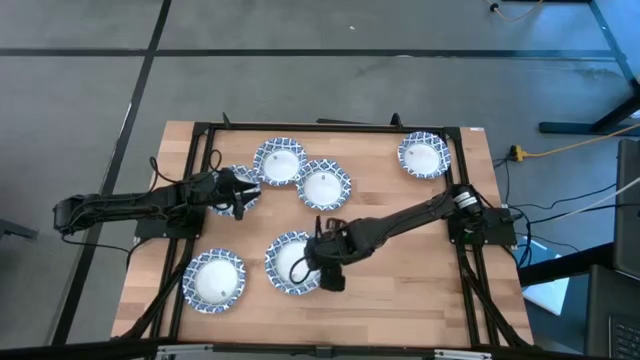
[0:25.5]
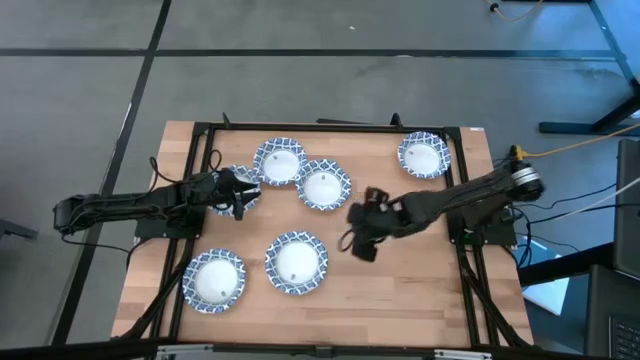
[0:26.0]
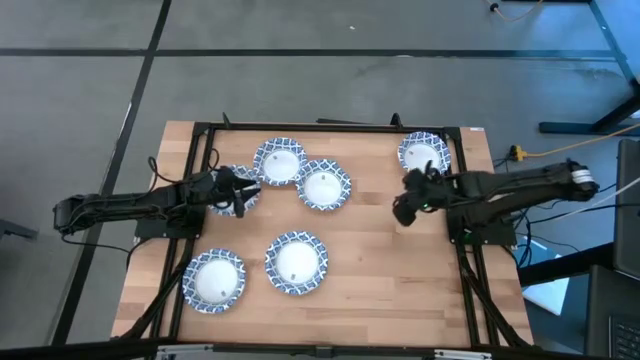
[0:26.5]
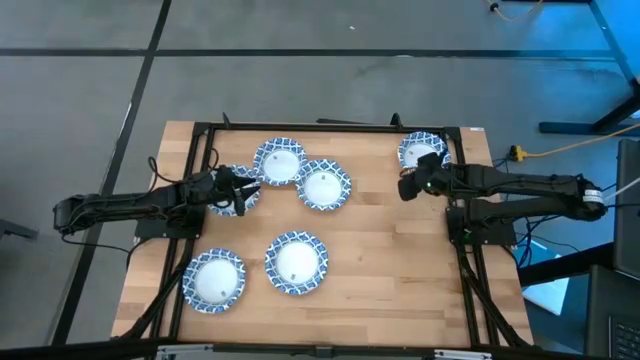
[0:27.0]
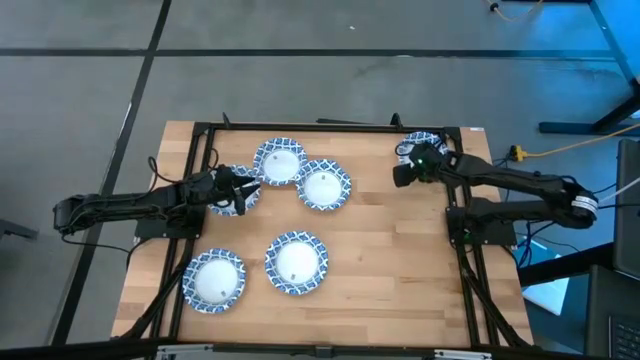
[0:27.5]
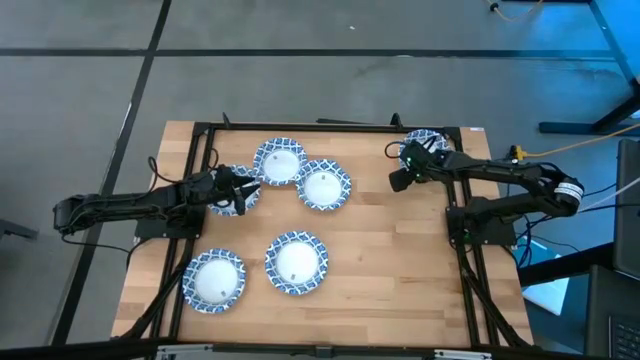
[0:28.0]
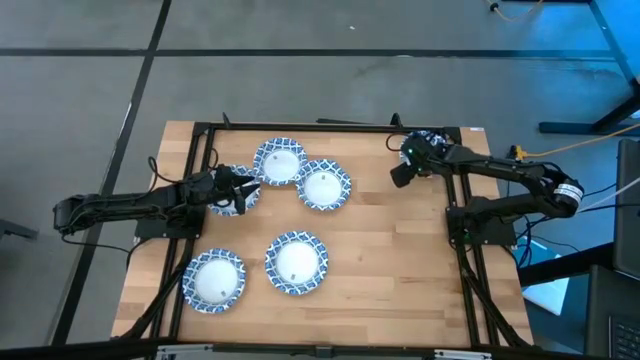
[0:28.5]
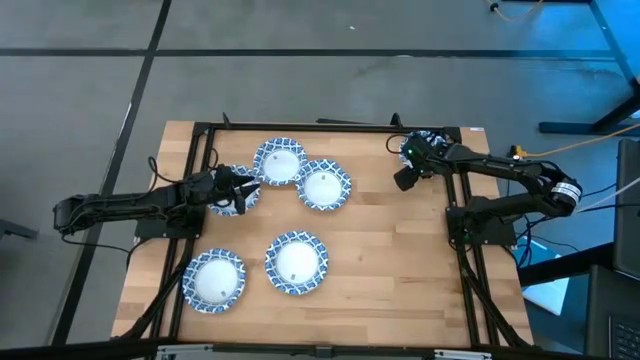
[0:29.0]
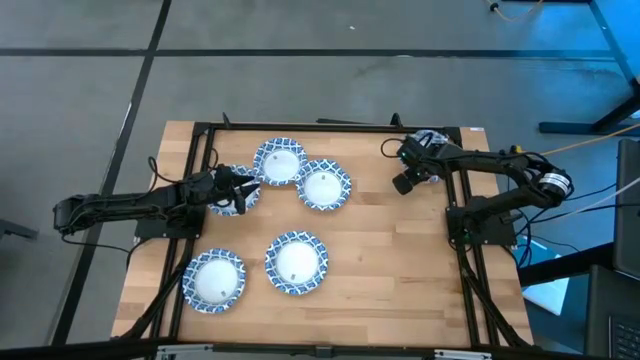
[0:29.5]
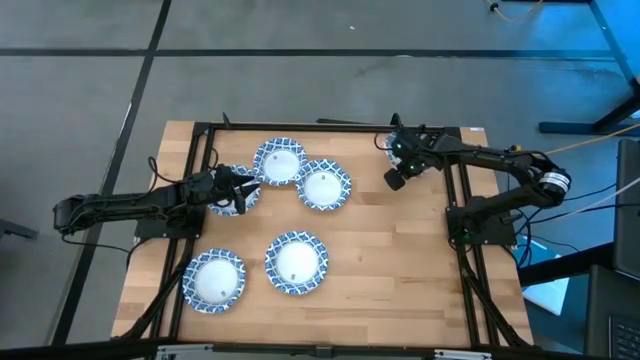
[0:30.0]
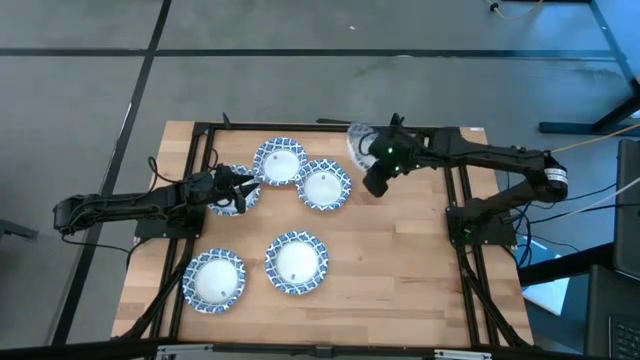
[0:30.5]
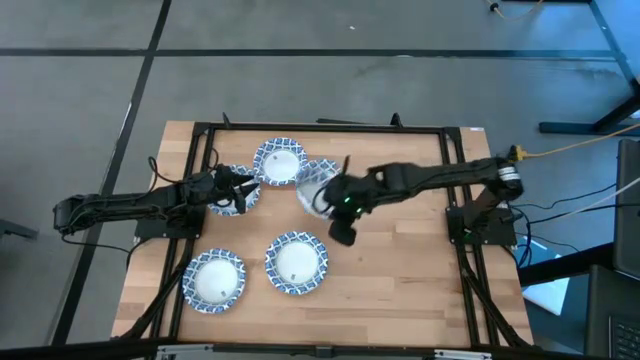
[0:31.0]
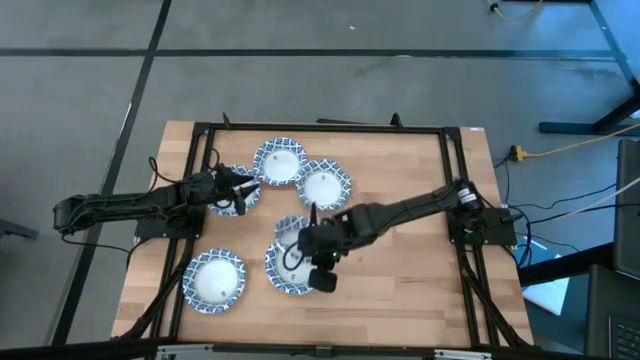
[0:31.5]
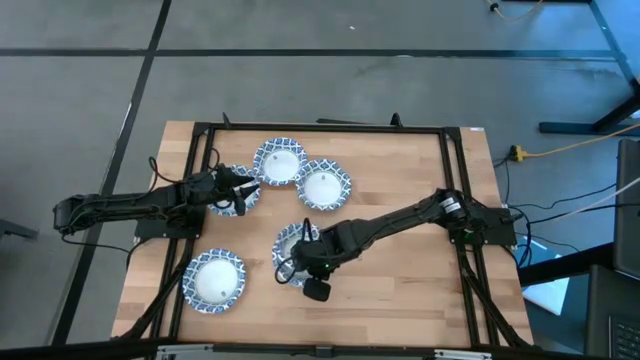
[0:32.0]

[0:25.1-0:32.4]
Task: Nest bowls inside each other
Stack the blue patterned bowl on the stacked blue patterned bowls

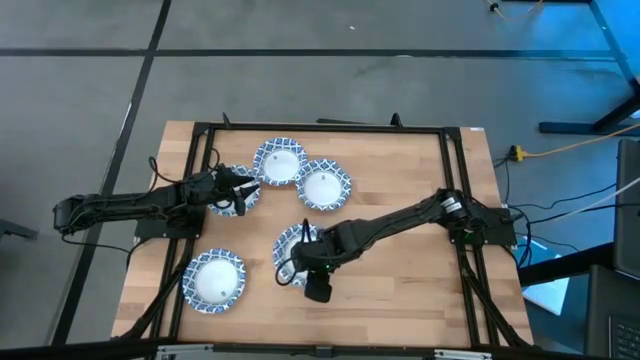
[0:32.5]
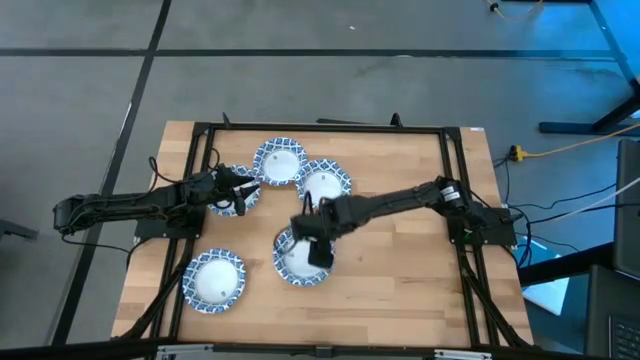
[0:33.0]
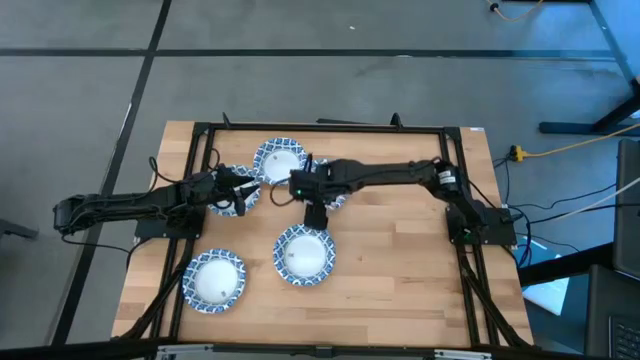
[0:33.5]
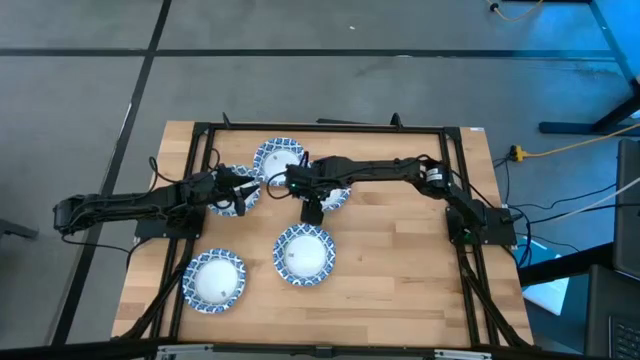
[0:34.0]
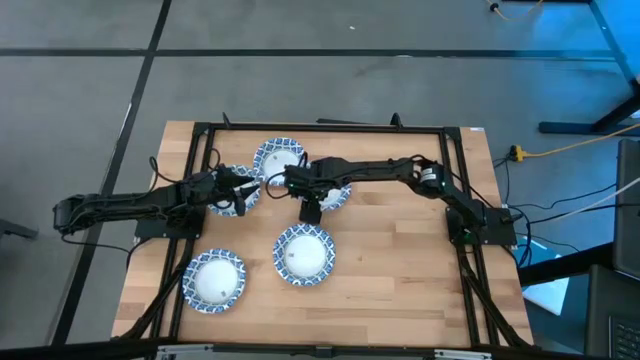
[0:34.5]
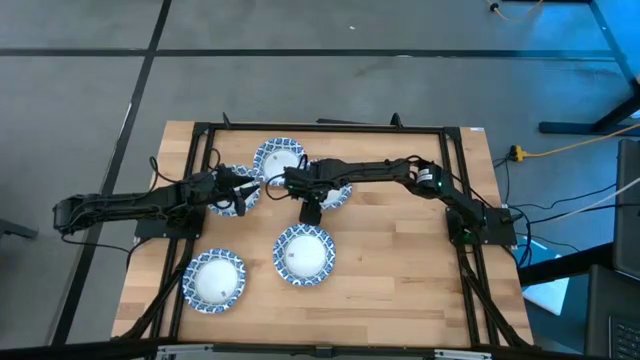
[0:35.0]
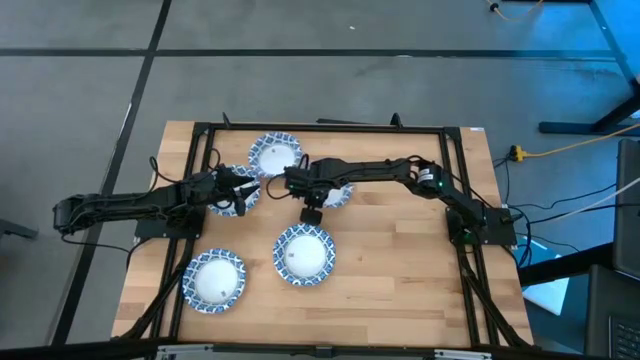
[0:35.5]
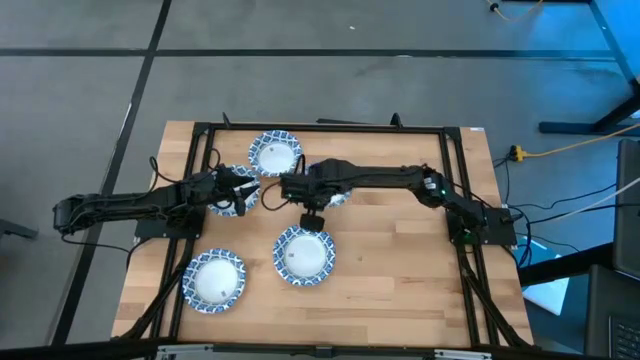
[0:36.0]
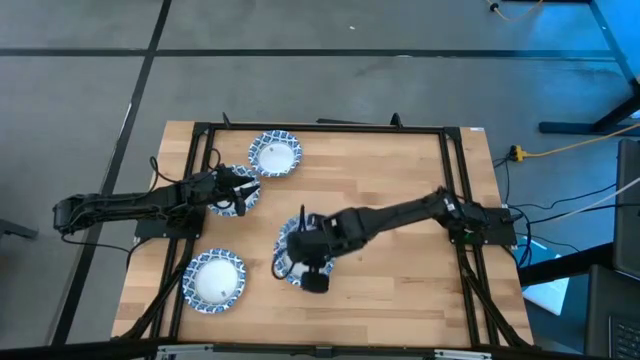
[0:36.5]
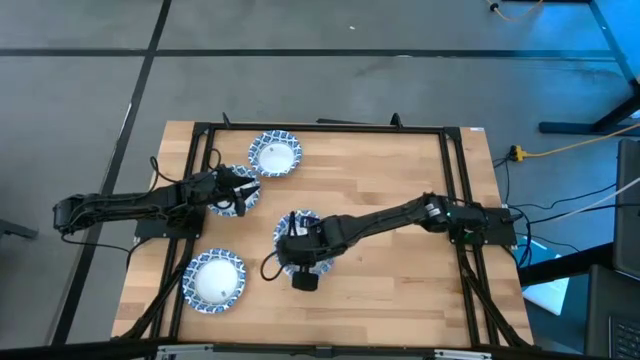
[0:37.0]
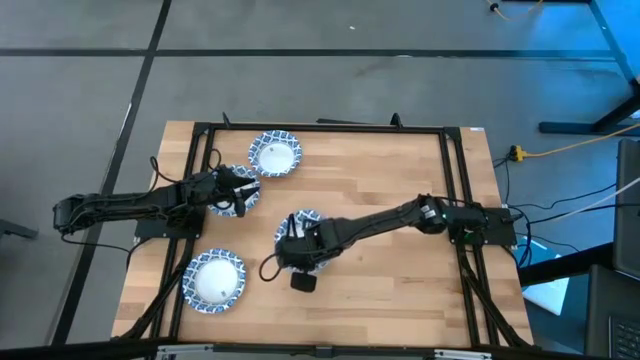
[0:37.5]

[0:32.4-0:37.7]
Stack the blue patterned bowl on the stacked blue patterned bowls

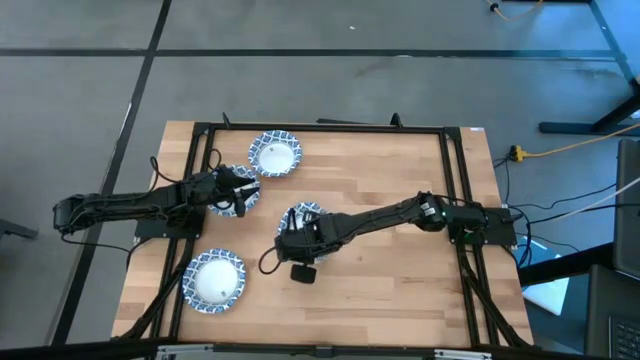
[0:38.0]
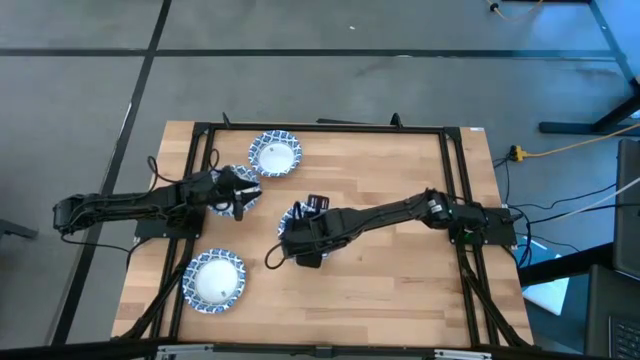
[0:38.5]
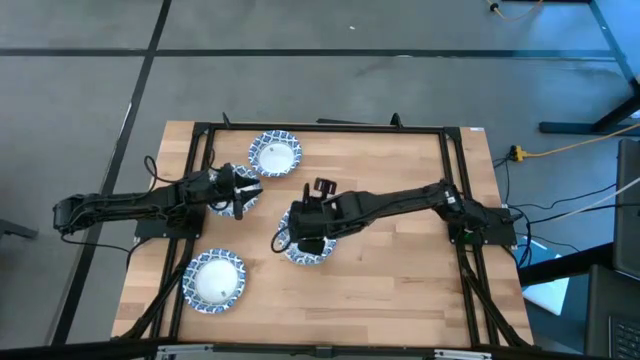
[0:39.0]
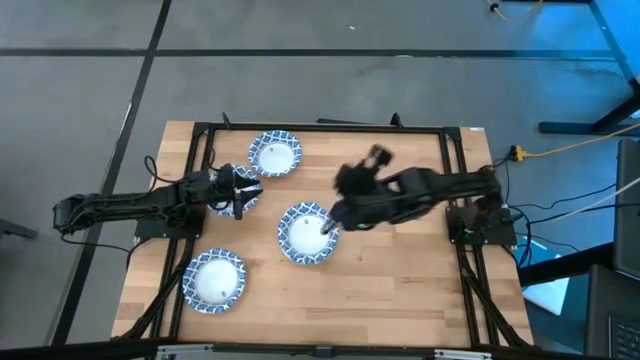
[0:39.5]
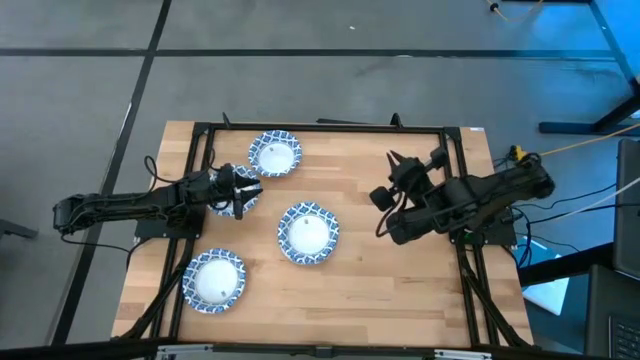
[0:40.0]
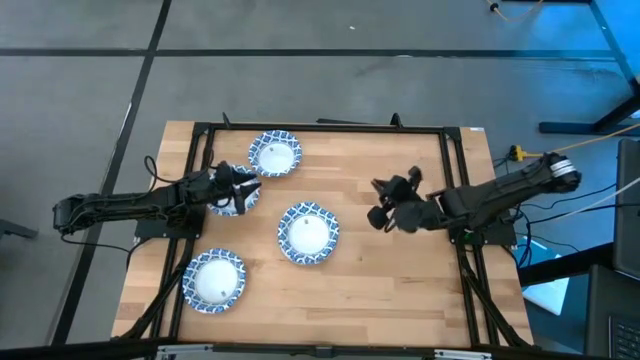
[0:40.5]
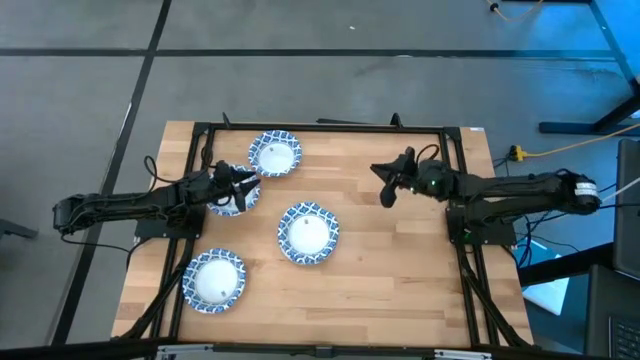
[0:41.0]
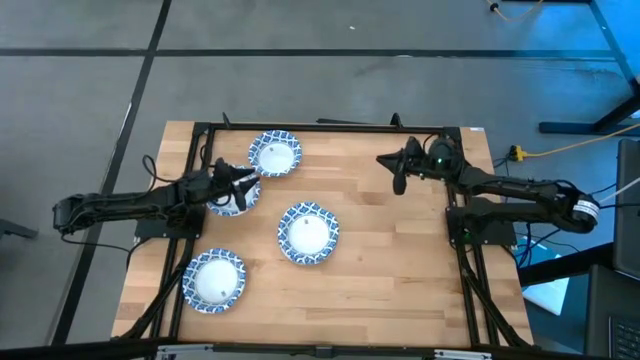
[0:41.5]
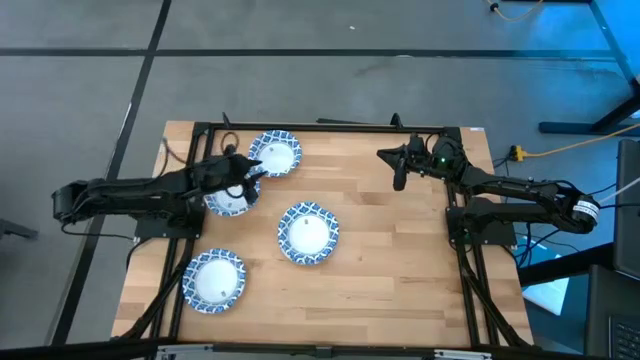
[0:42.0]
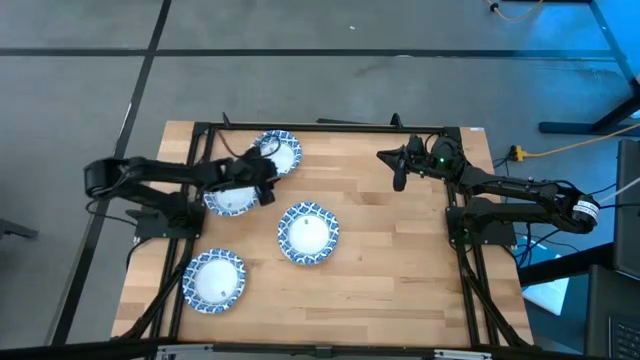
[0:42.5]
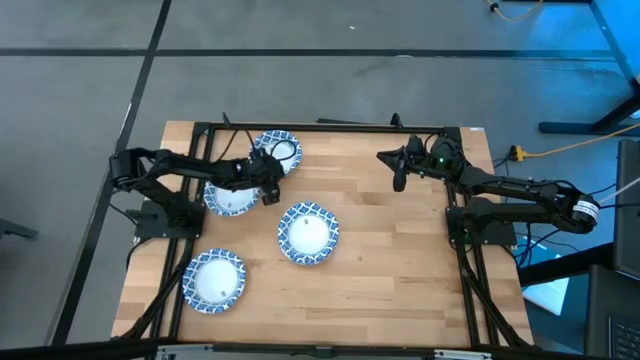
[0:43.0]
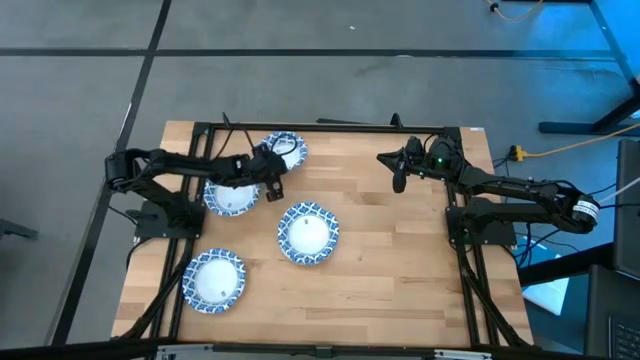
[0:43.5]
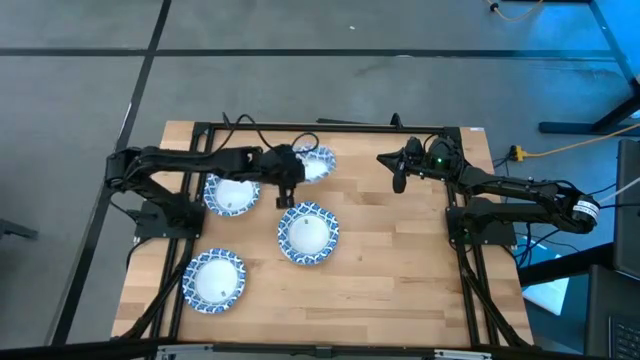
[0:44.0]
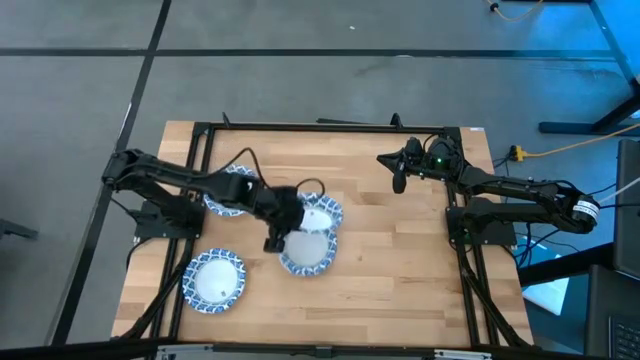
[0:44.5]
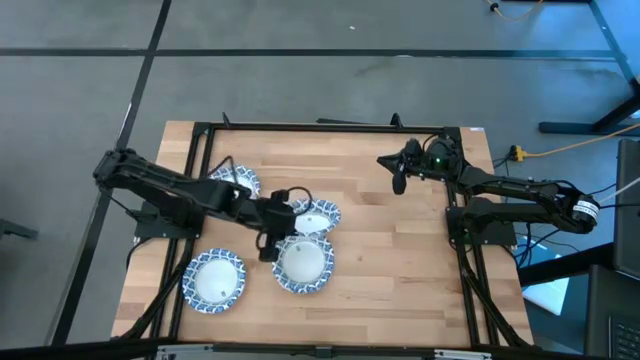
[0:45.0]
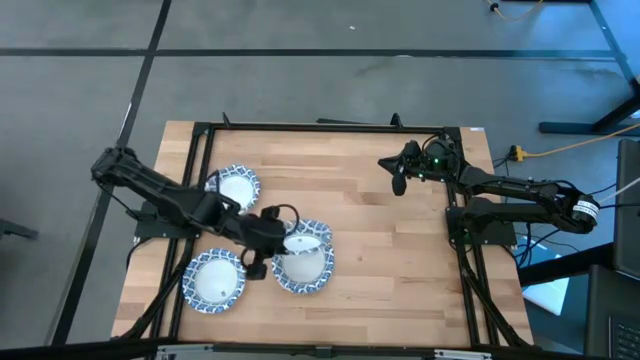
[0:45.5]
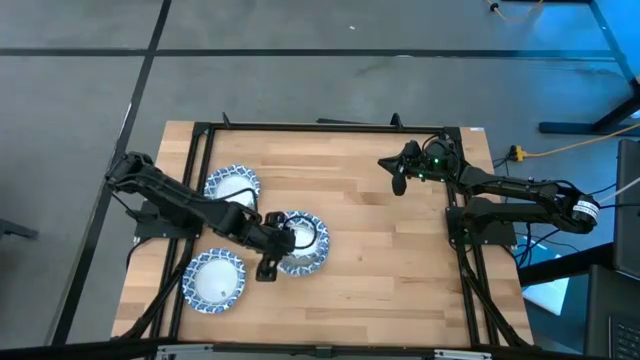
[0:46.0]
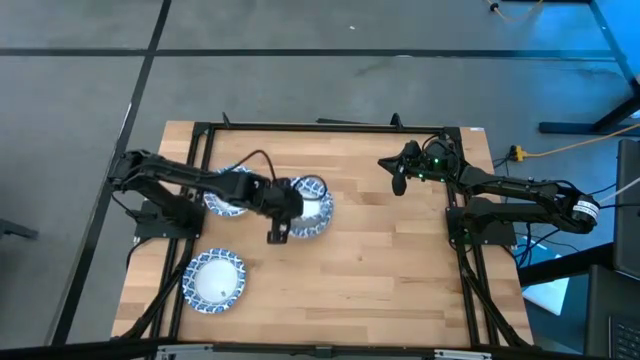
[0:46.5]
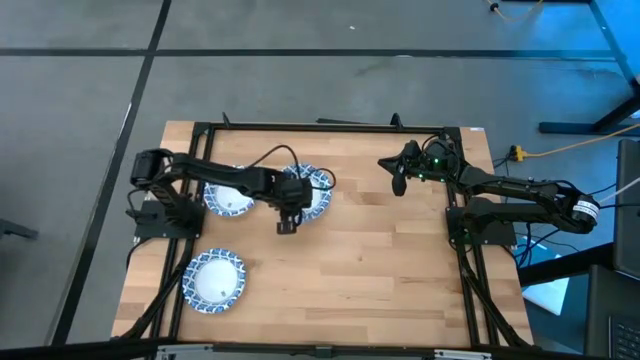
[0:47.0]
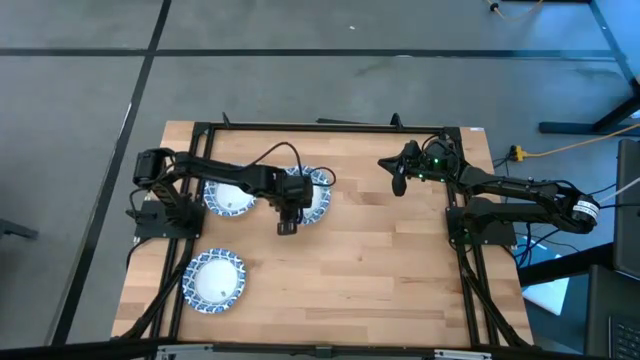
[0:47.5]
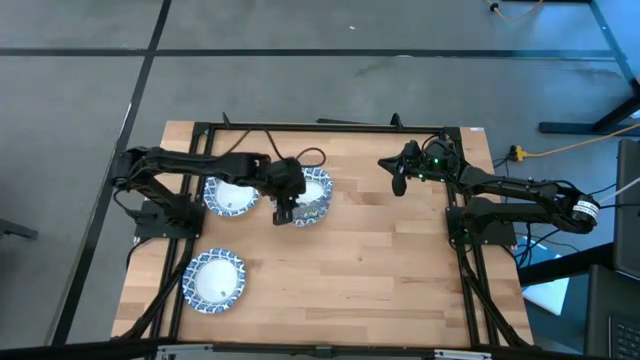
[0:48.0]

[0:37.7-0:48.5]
Stack the blue patterned bowl on the stacked blue patterned bowls
